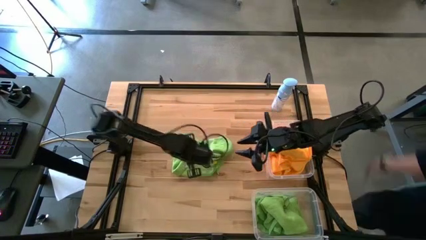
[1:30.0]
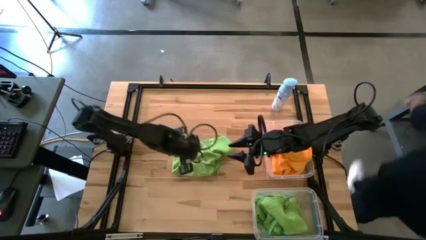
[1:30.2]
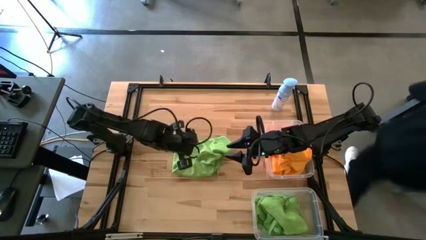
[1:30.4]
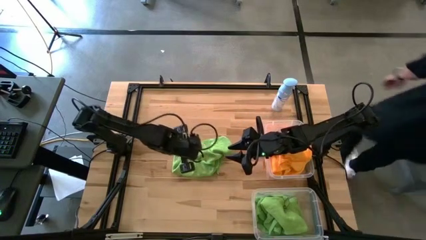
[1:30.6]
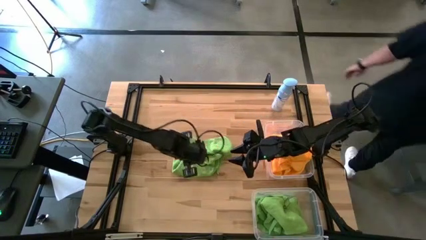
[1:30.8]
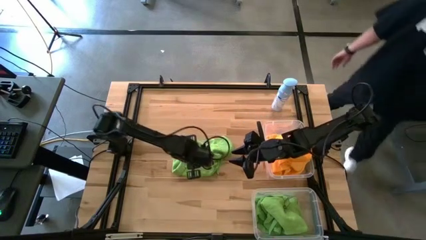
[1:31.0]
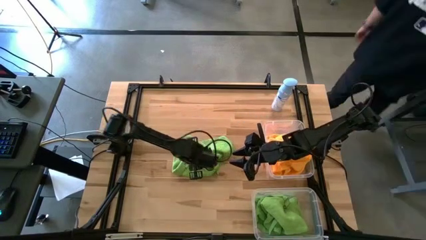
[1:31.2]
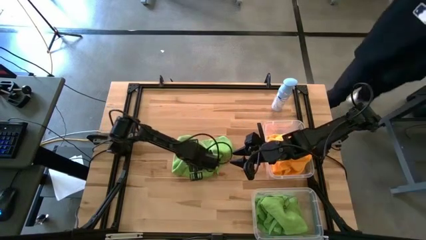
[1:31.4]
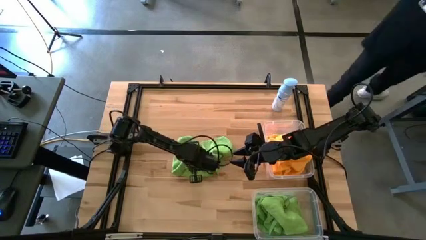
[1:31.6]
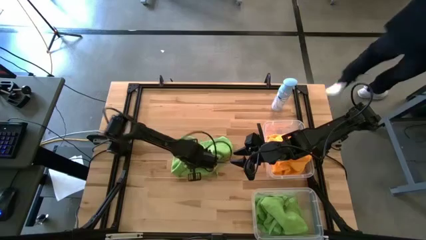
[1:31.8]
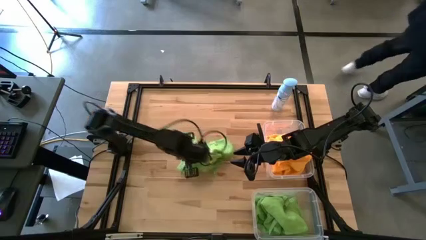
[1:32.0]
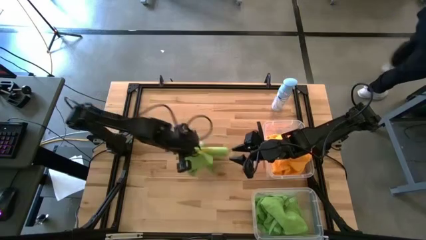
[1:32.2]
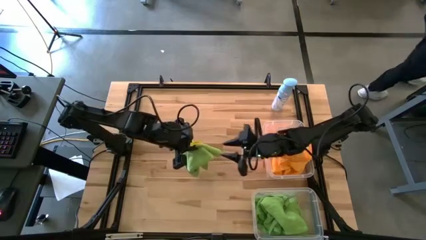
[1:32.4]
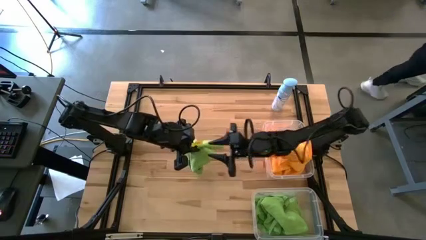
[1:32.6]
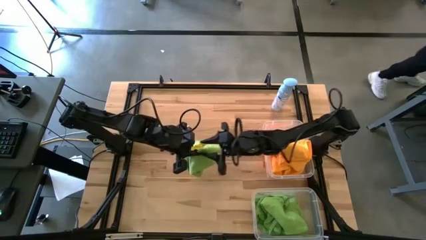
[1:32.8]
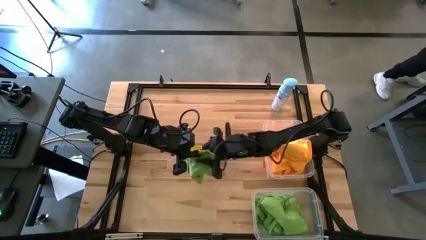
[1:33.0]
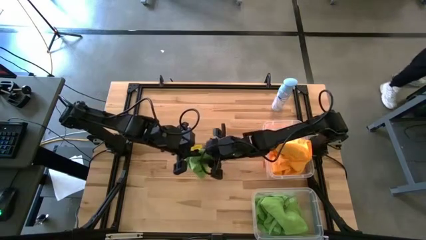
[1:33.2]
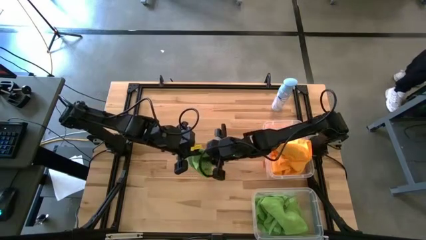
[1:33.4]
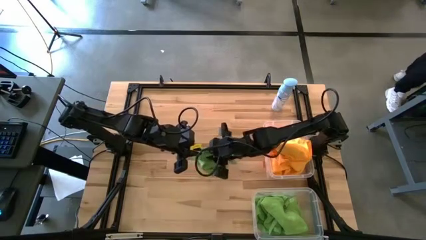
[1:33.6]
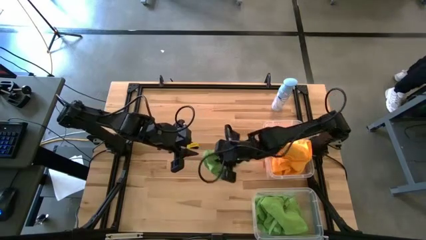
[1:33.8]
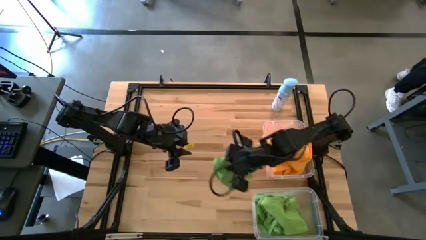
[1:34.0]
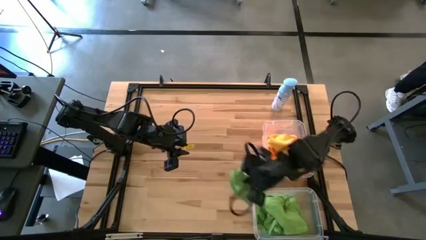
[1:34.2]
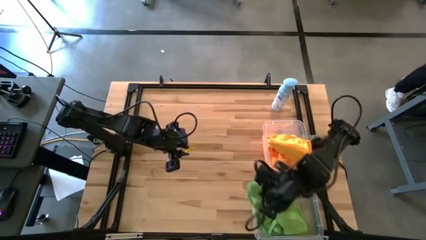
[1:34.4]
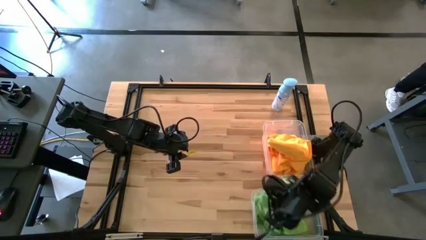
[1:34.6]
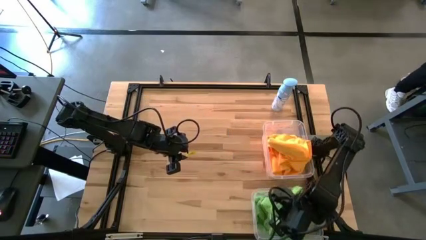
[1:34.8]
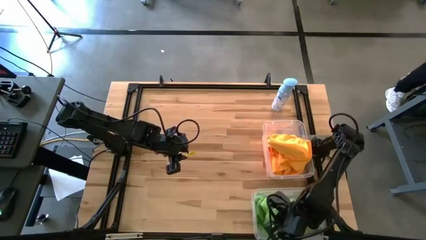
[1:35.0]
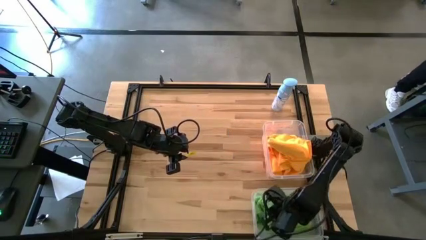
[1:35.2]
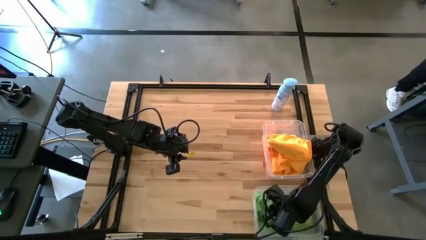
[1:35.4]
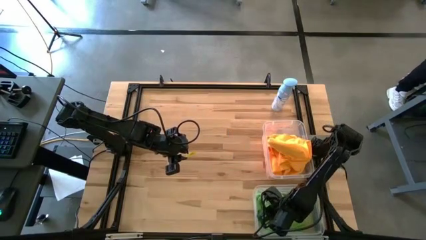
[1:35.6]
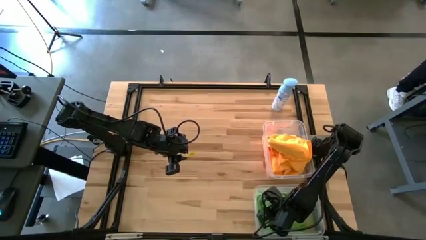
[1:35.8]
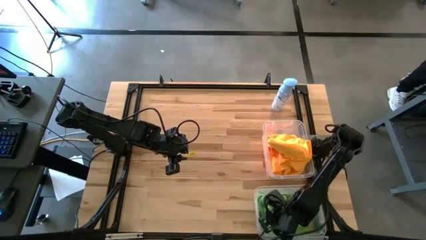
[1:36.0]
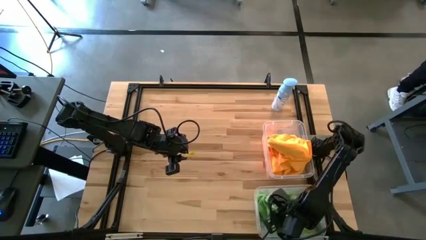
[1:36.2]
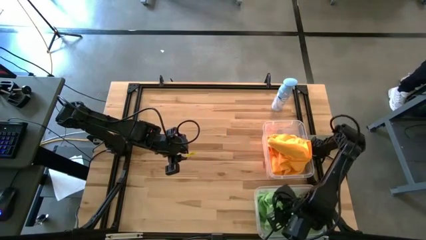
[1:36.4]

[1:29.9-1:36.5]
Task: Sort microfiber towel by color & place in baskets
Put the green towel into the bottom transparent bin

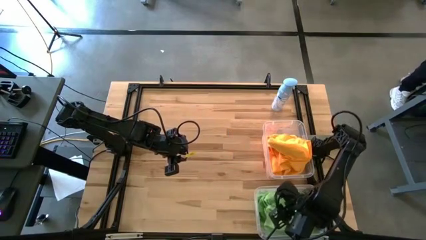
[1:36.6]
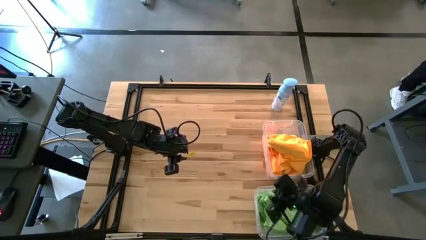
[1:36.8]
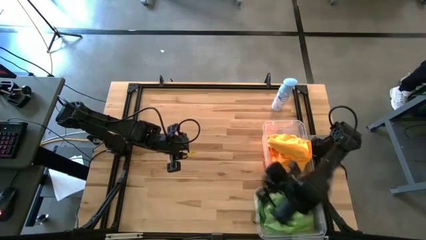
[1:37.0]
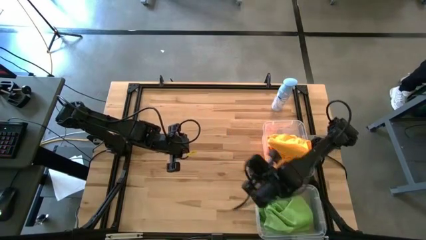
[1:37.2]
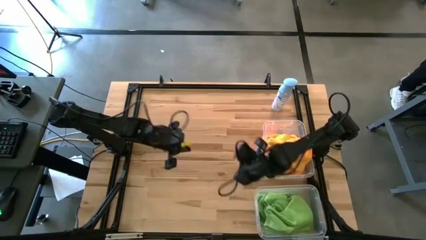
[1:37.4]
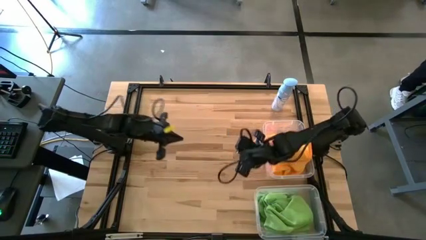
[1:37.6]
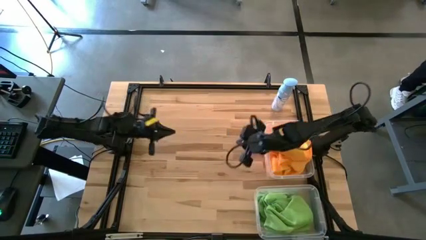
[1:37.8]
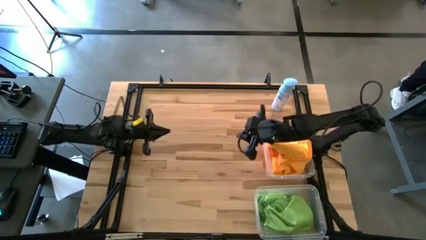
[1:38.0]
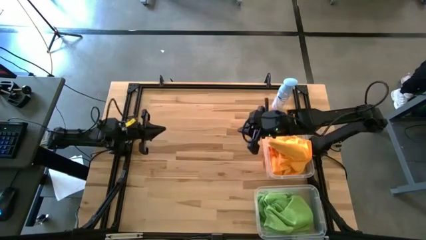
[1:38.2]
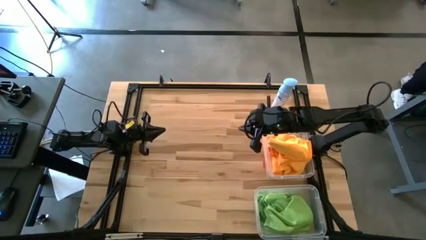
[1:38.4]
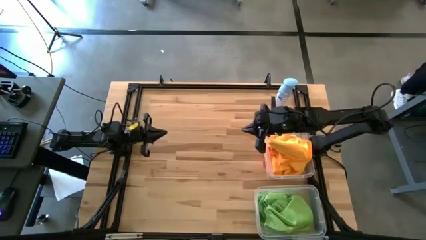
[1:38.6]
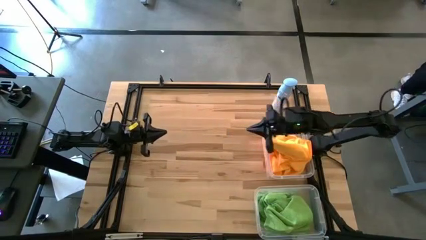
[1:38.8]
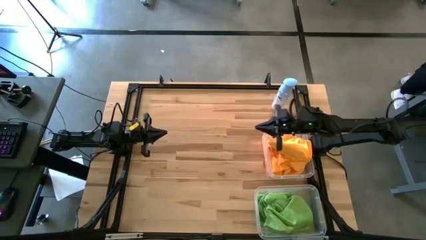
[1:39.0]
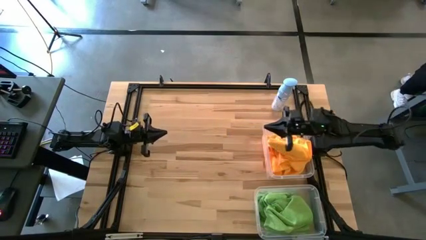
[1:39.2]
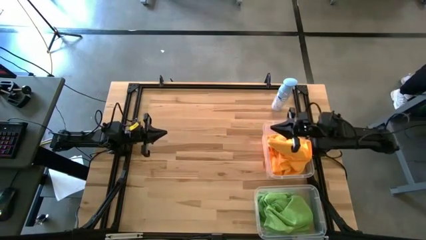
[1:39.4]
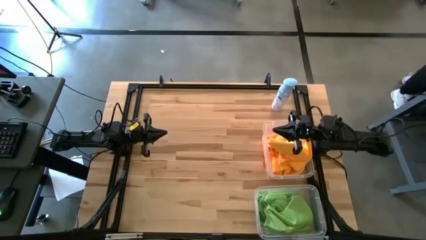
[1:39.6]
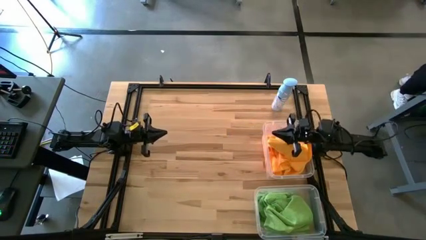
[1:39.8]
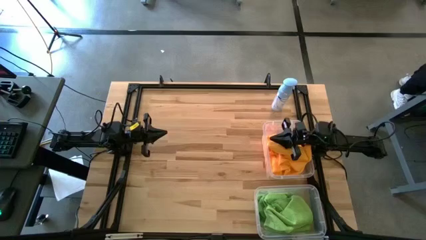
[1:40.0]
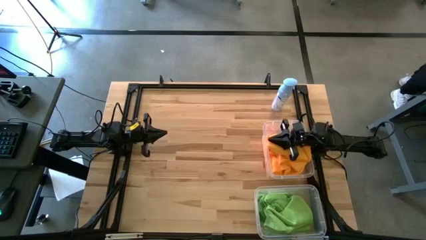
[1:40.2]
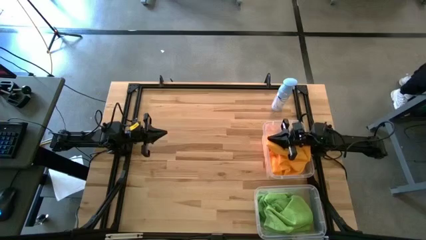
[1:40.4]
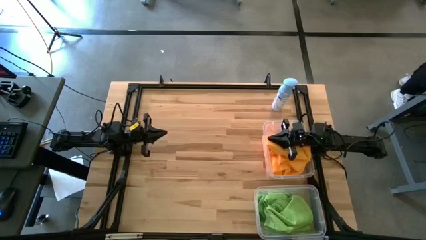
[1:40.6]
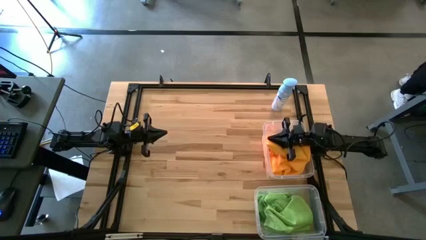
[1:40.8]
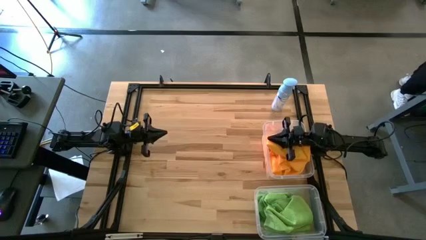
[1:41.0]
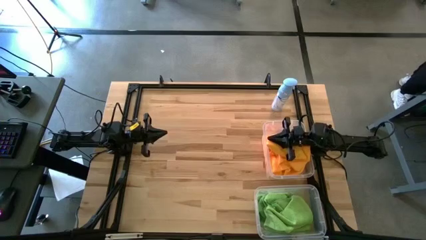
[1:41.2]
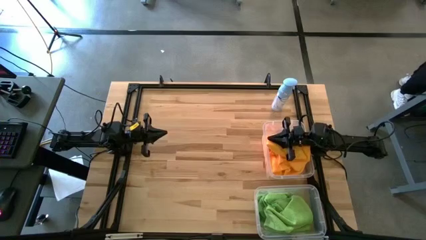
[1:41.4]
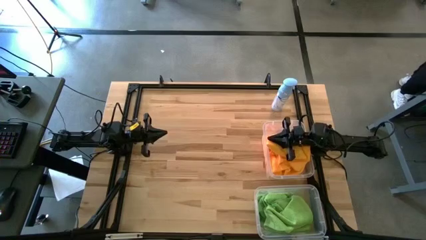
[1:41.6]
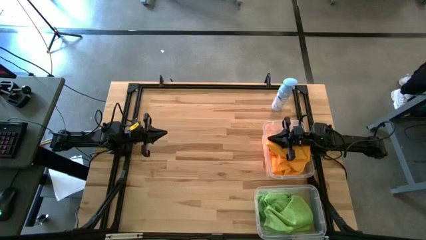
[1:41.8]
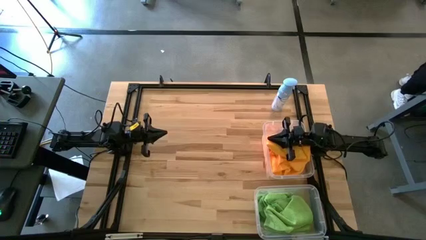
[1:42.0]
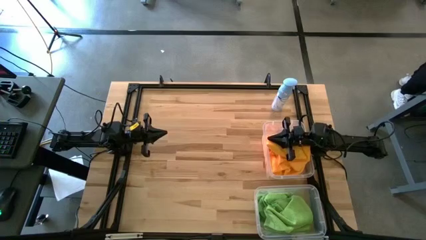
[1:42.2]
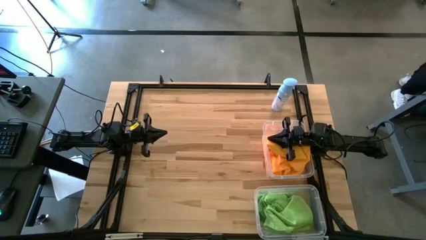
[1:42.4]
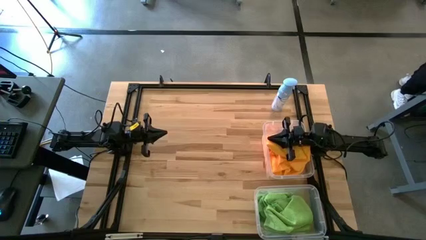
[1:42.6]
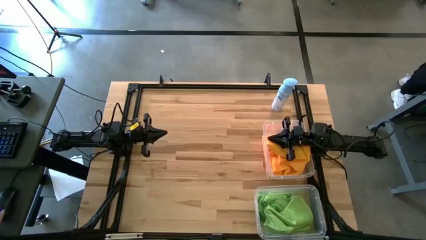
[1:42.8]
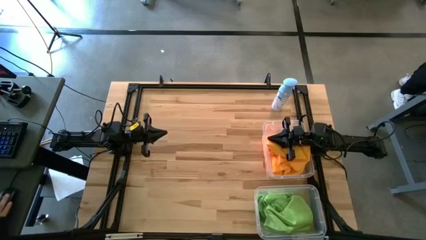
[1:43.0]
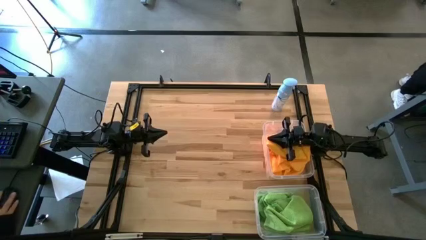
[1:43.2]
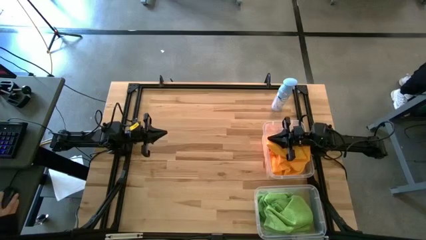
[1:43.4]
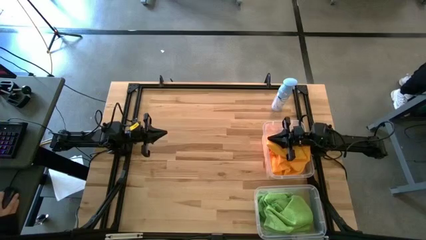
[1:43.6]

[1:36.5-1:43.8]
Return to Home Position

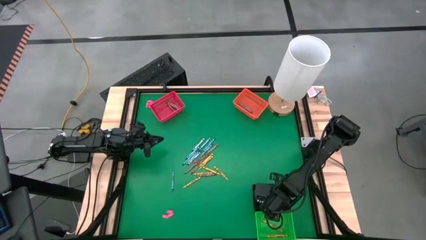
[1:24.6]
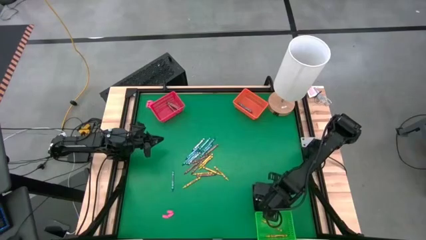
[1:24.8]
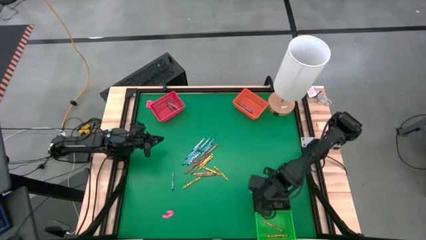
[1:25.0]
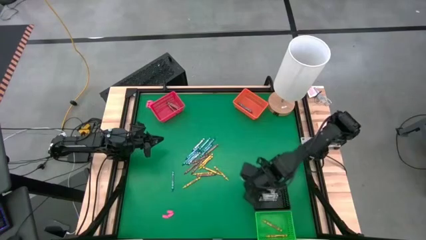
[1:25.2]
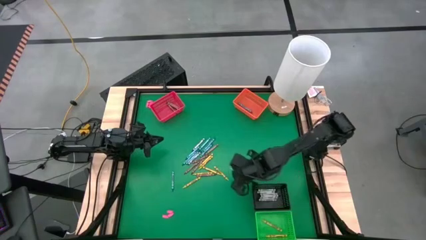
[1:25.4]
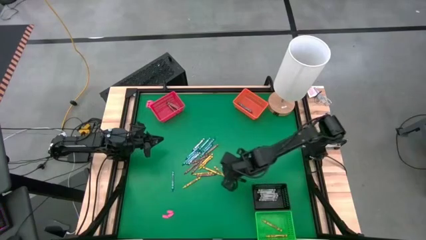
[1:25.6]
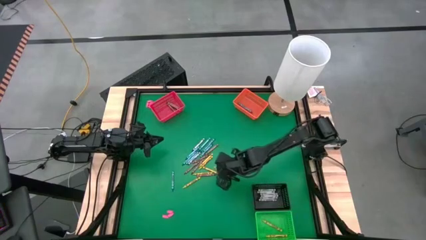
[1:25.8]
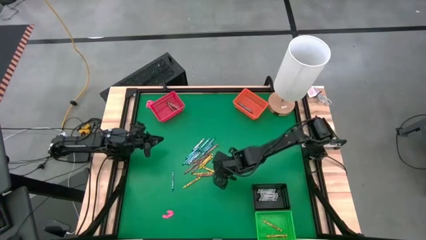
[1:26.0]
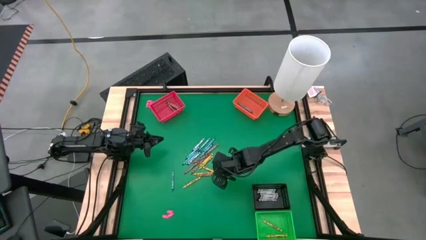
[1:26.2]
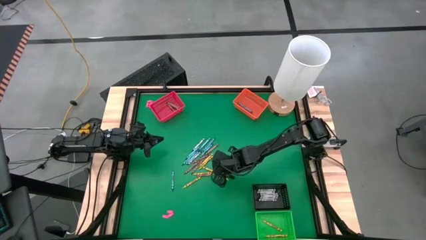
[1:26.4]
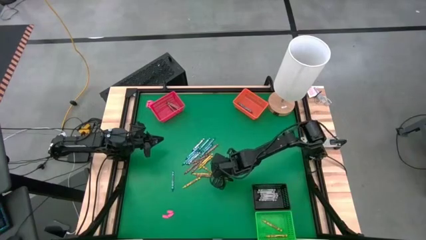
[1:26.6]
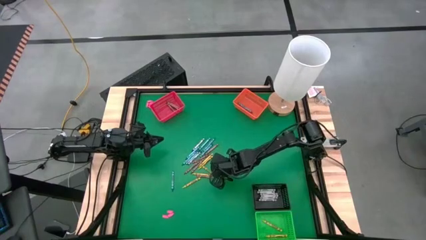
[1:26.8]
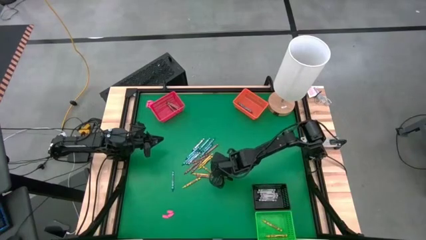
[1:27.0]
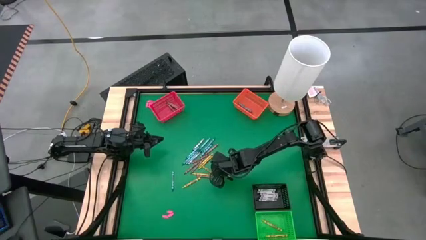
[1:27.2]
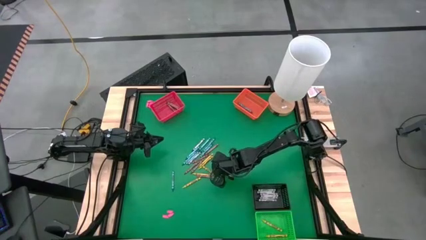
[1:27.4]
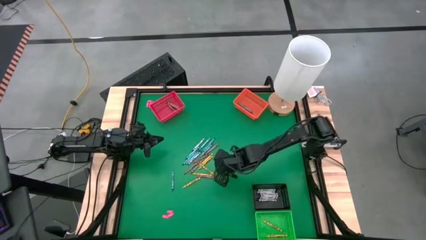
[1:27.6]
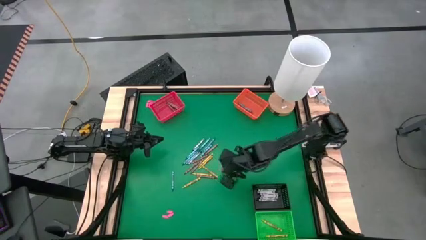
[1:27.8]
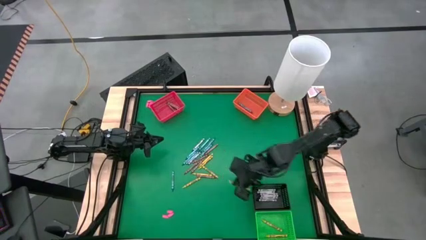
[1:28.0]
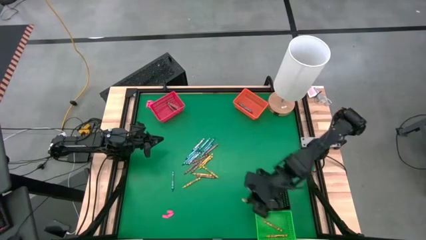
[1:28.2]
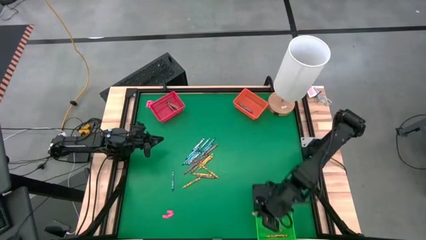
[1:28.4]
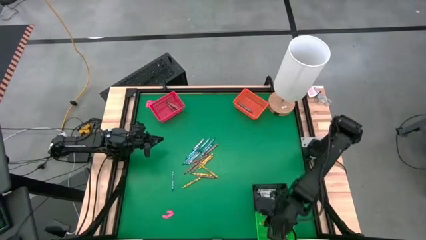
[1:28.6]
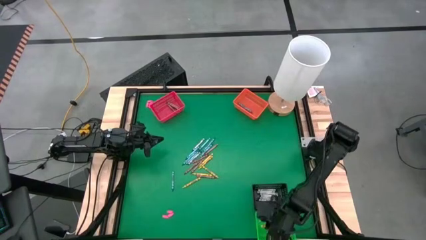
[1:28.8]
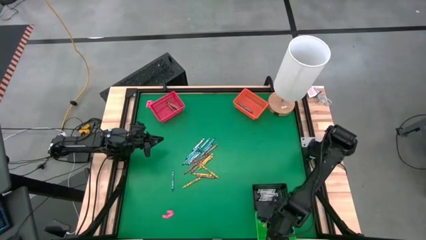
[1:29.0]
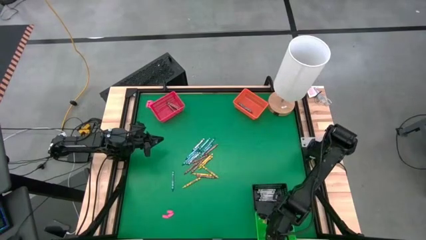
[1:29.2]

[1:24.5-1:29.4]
Task: Sort crayons
Put the yellow crayon into the green bin
